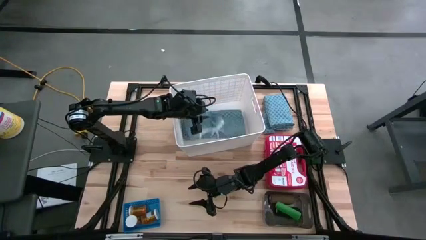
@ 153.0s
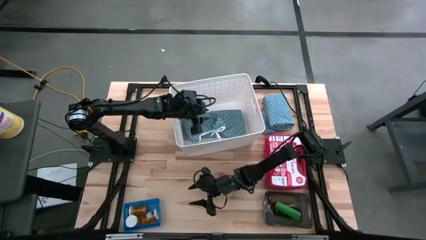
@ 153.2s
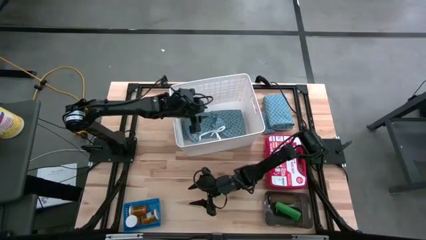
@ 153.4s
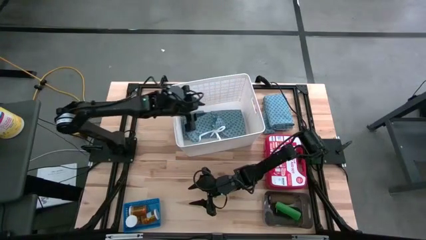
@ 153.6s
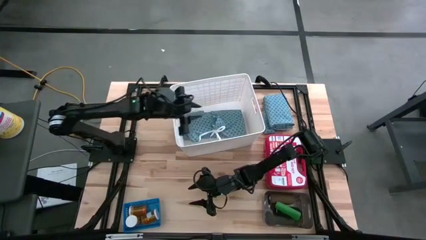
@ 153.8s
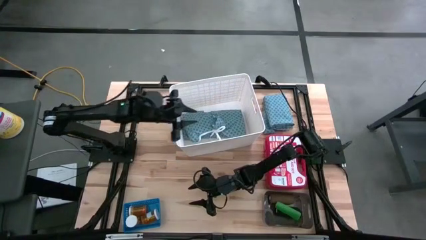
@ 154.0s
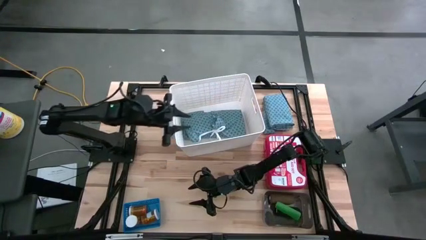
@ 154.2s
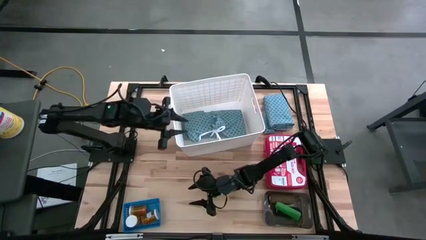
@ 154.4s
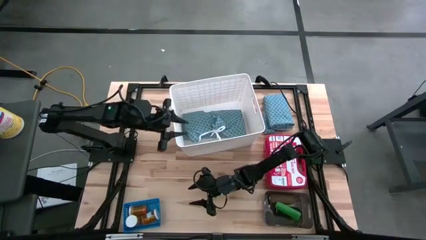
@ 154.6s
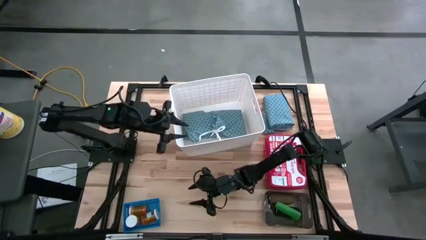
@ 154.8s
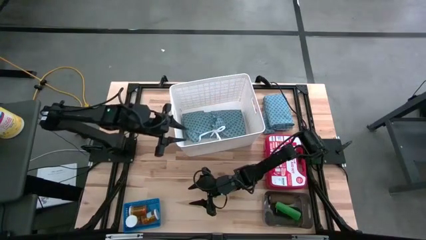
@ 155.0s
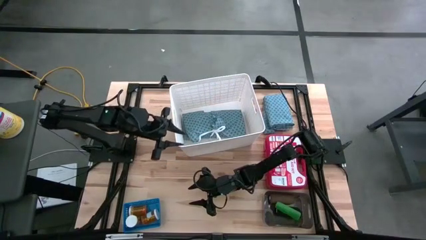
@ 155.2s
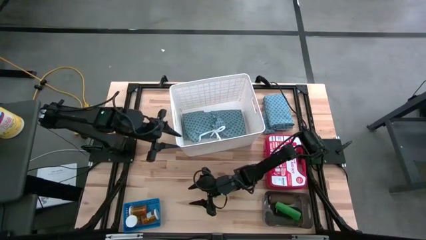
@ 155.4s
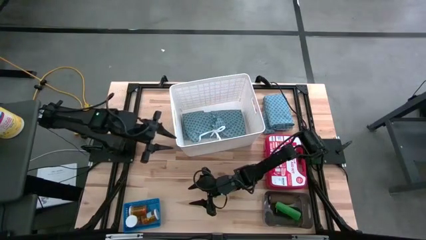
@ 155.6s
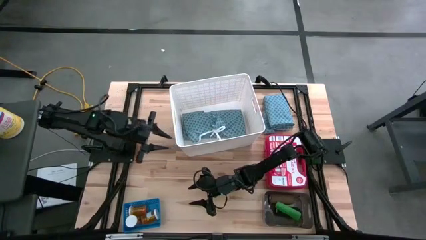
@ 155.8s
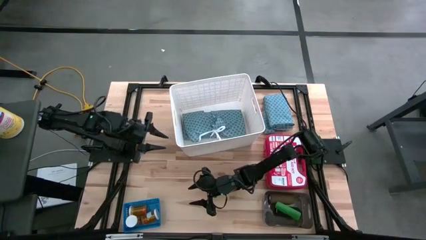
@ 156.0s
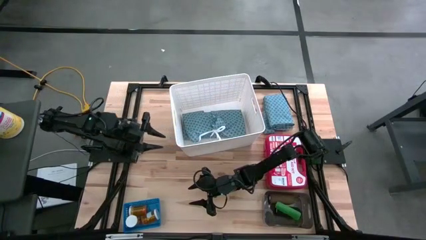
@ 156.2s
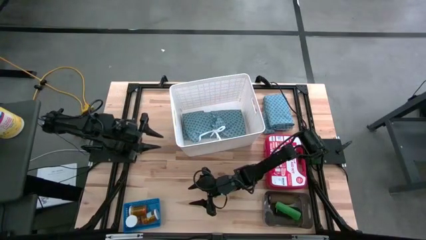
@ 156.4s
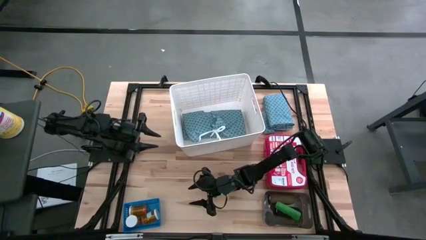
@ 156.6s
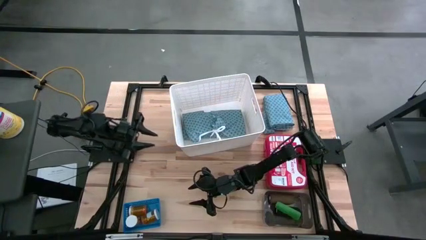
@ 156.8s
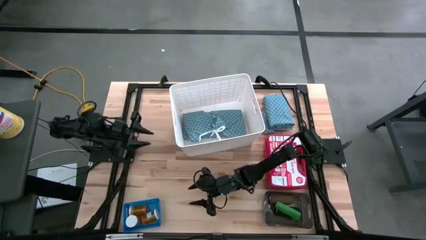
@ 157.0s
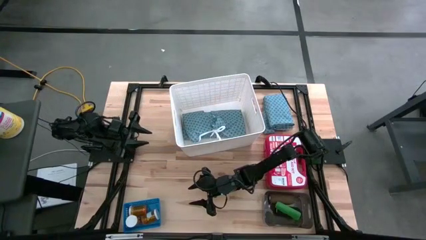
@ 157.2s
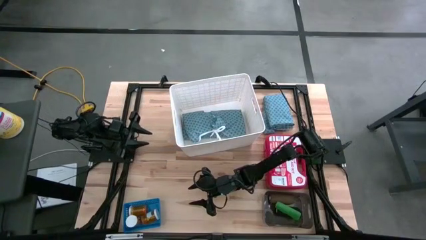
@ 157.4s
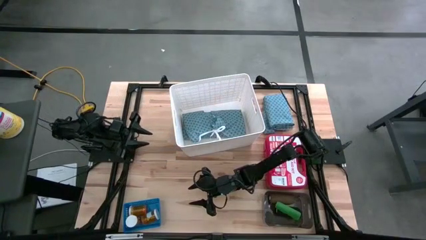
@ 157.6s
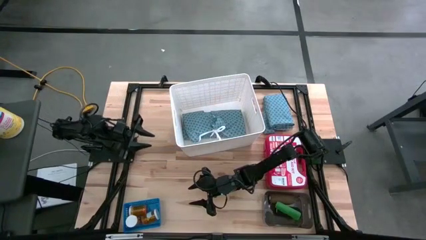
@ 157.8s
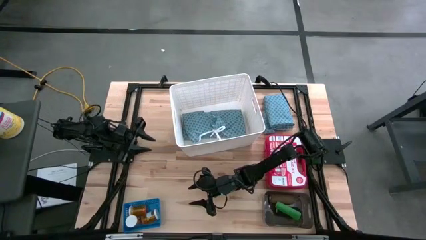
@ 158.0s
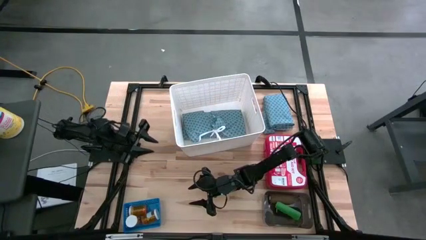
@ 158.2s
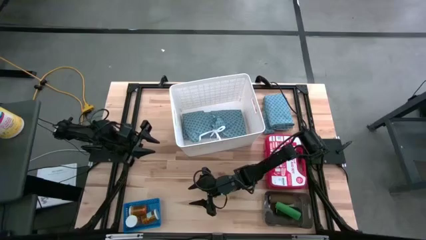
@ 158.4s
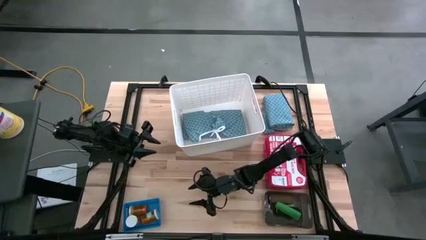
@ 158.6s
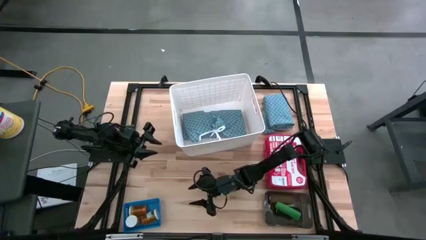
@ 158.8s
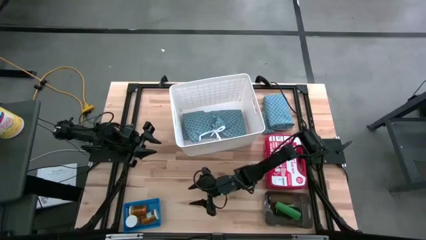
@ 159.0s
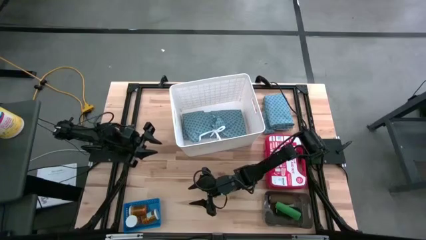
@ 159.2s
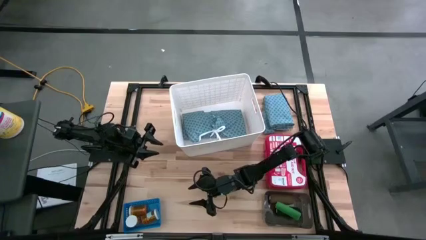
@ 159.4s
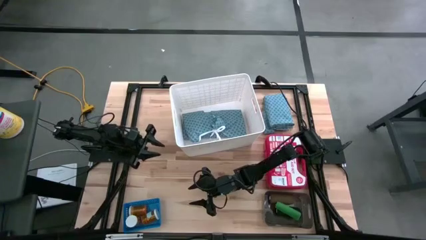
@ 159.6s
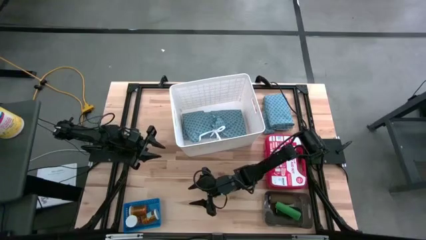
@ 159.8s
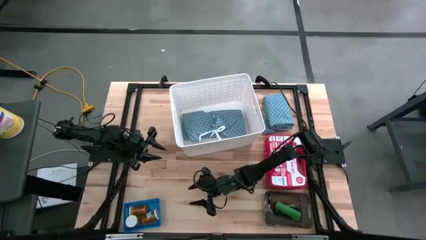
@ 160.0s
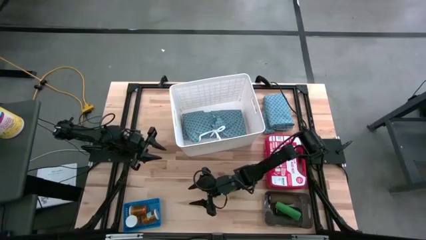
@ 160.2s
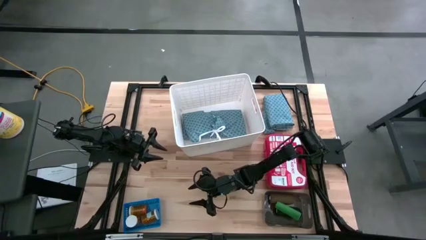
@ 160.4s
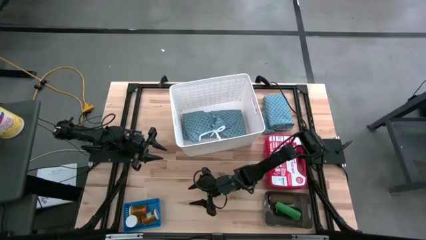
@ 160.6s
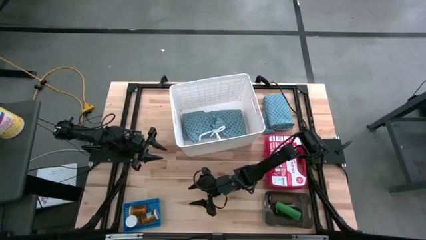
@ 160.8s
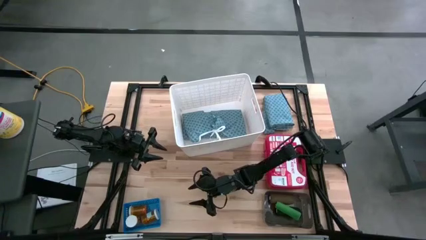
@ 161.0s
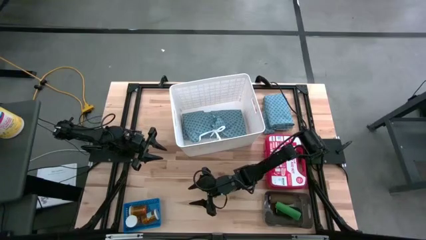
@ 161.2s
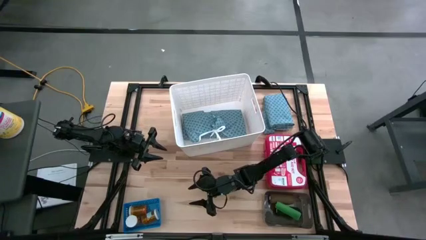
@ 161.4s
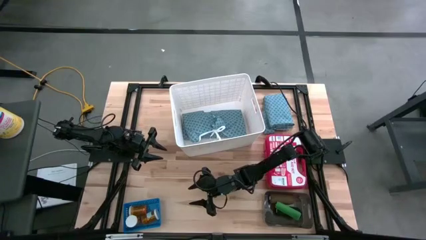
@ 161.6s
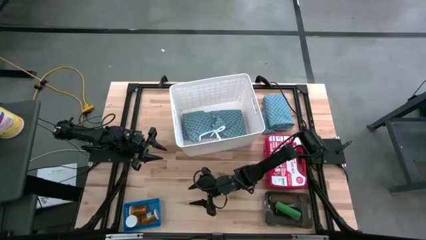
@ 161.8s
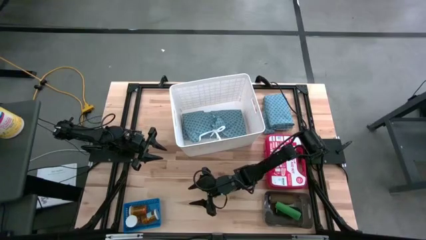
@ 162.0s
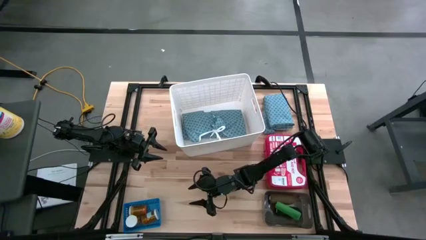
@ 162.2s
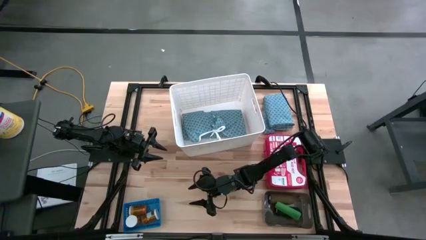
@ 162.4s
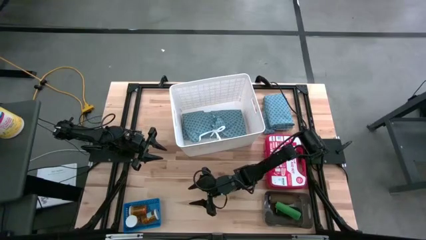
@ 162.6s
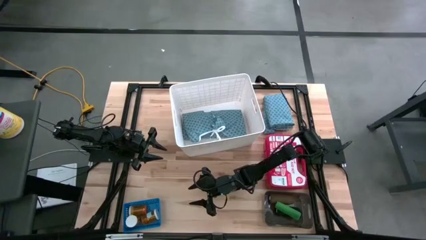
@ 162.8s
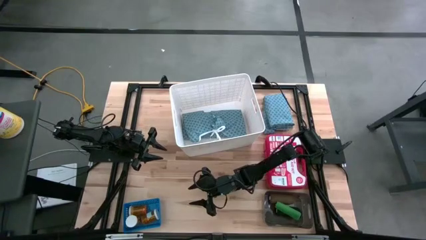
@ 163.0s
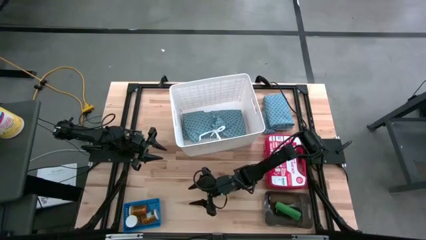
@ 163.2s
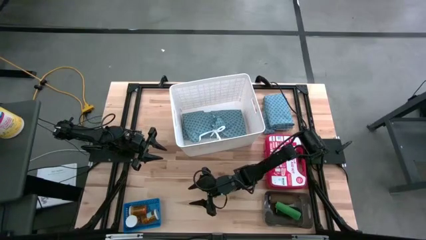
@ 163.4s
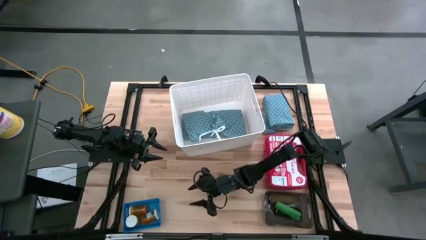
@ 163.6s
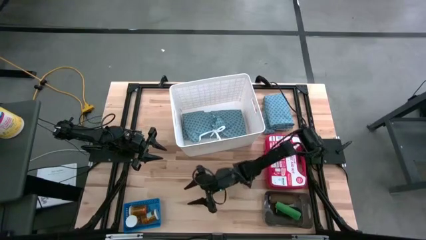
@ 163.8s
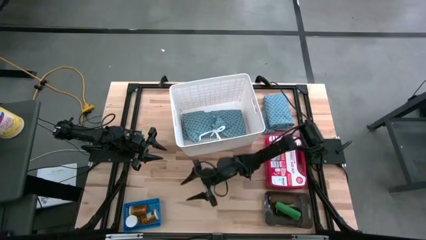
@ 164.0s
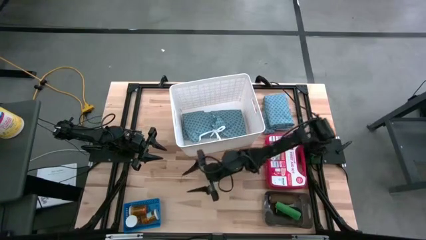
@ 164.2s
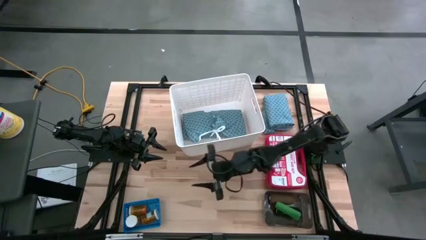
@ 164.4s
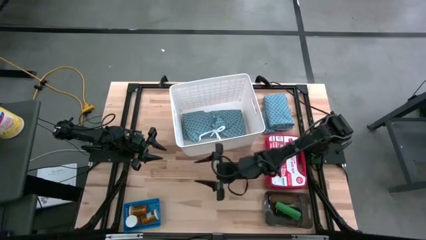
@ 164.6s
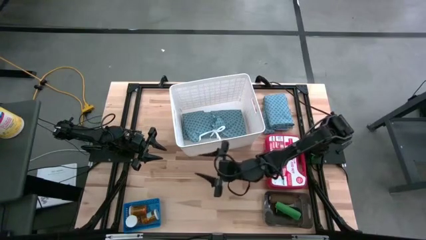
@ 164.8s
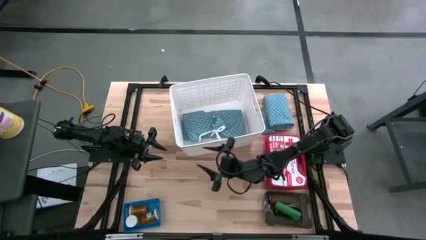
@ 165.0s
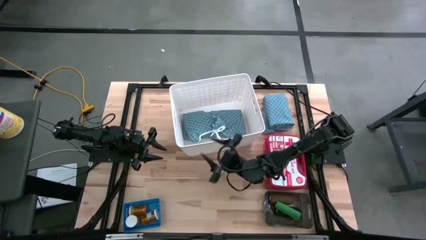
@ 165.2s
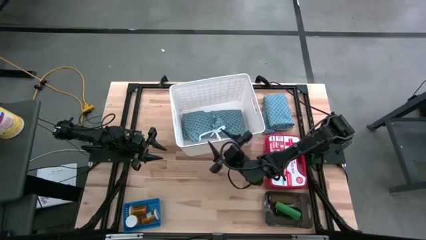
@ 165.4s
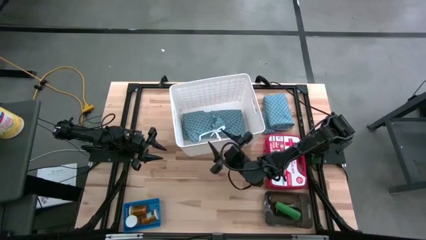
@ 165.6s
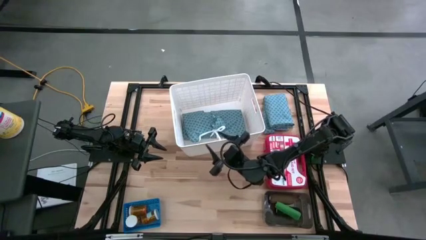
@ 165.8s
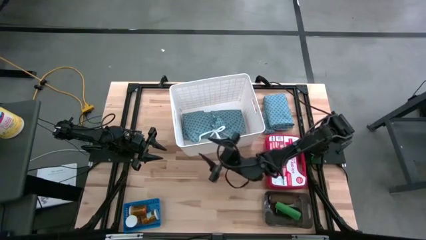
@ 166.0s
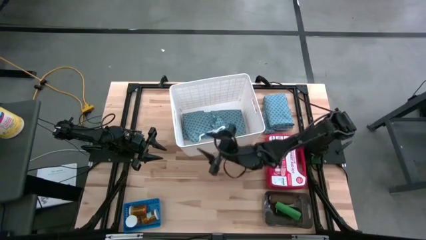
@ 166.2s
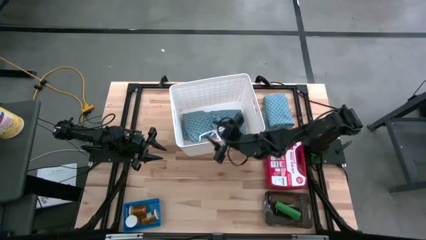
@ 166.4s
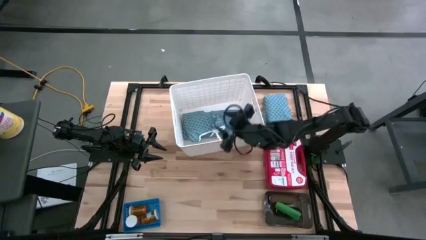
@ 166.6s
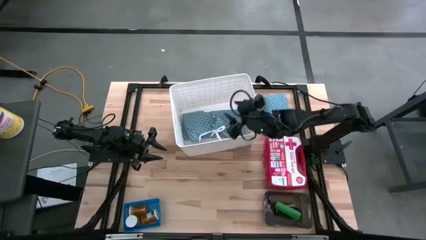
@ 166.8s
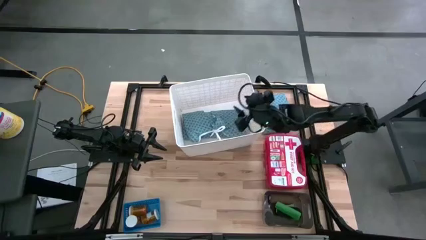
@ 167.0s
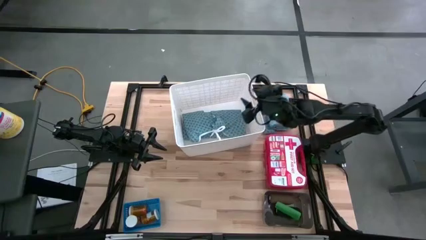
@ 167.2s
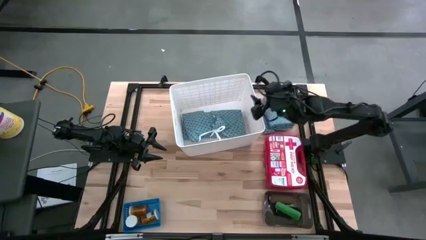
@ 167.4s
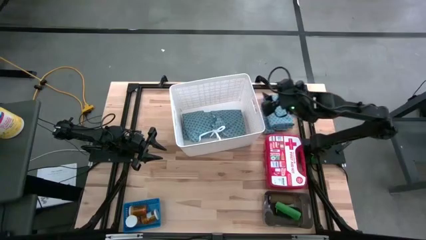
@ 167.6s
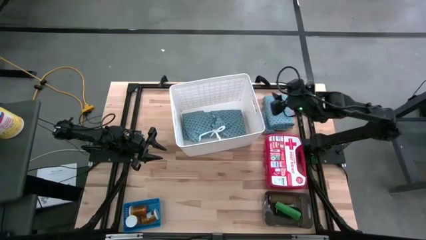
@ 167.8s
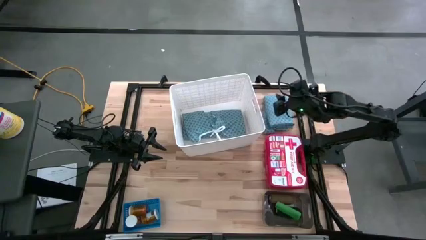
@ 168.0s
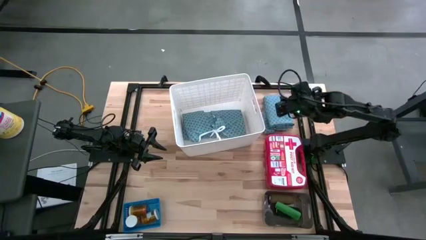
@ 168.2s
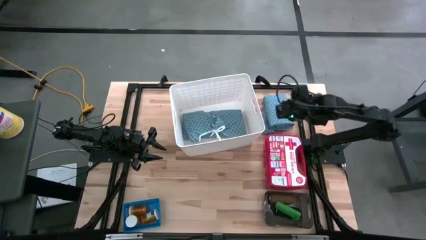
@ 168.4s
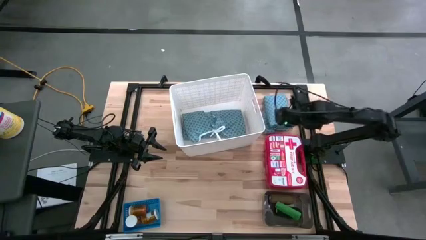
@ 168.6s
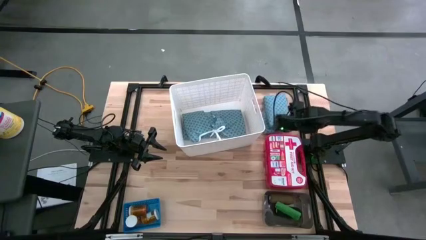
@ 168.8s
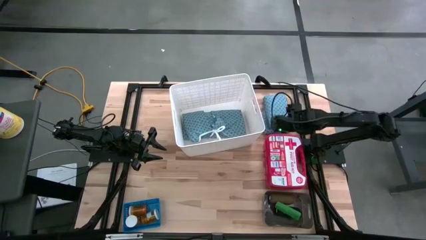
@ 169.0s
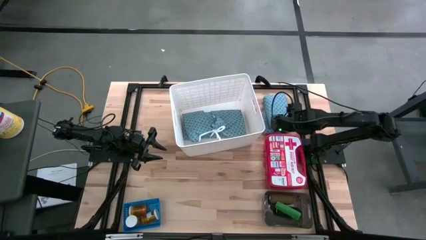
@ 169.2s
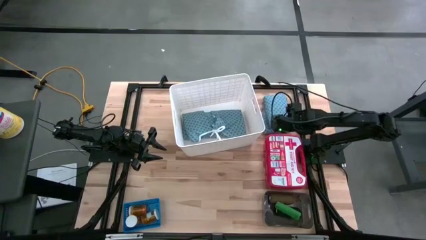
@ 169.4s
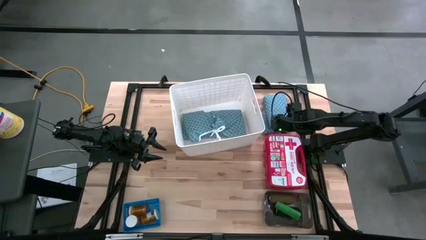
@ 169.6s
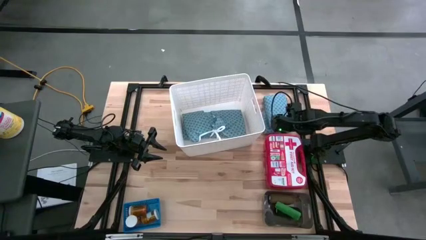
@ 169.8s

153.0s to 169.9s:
Task: Pick & place medical supplies in basket/bin
Put the patient gown into the white bin
